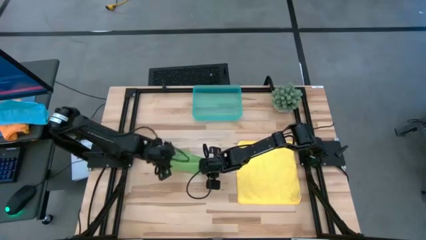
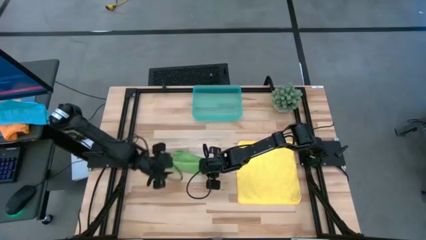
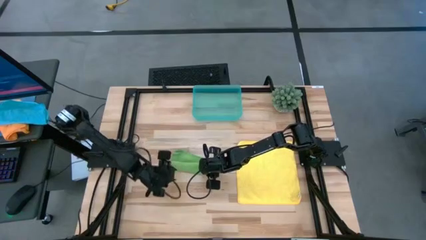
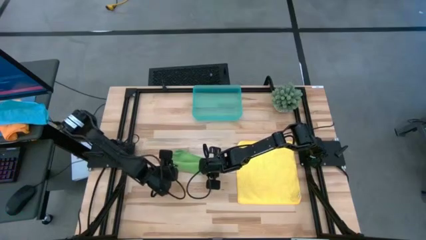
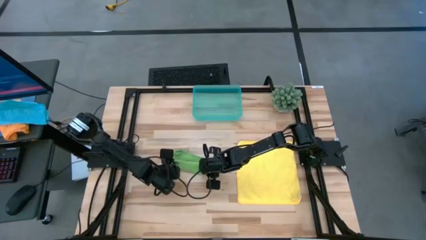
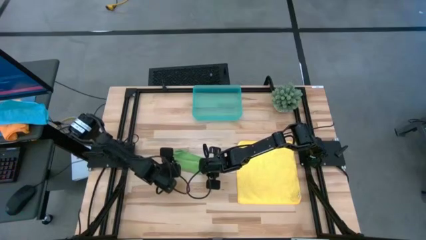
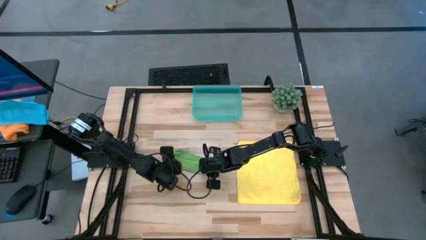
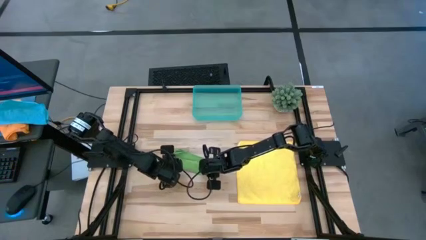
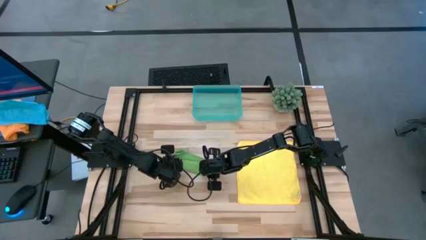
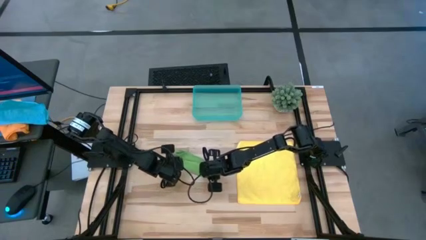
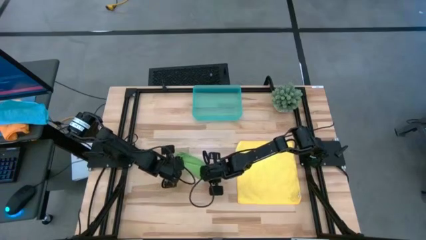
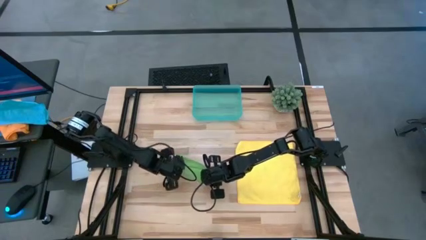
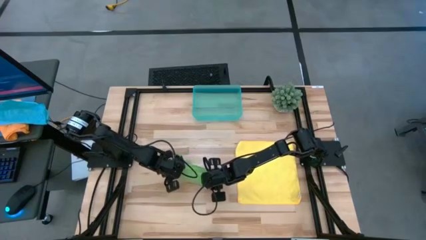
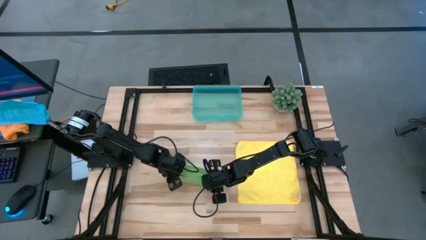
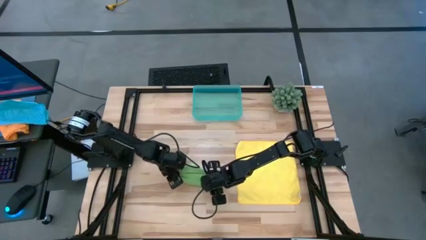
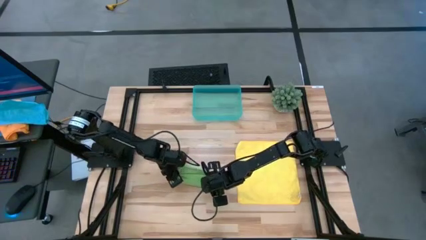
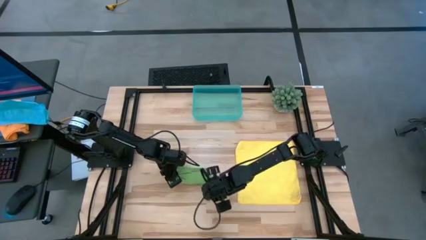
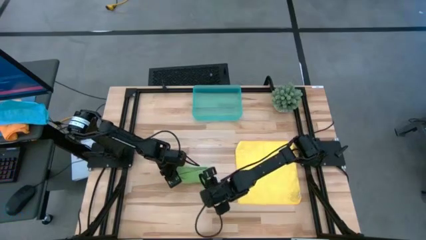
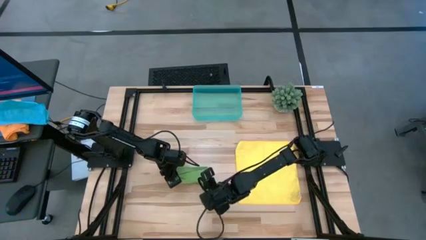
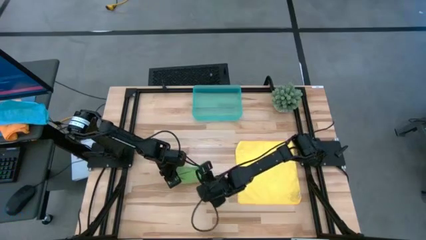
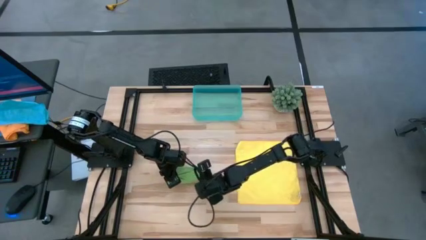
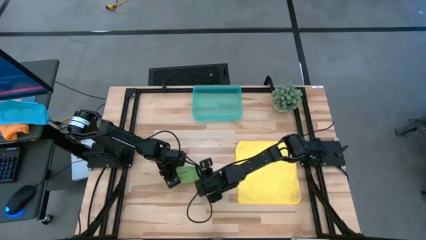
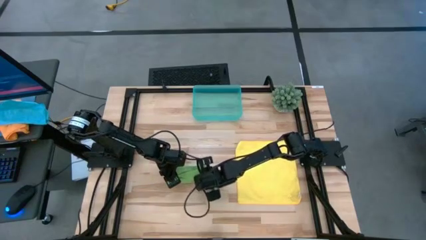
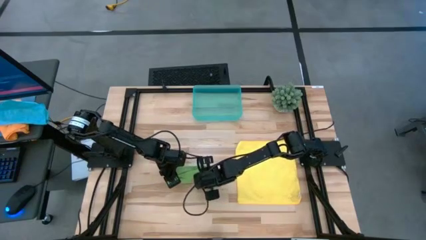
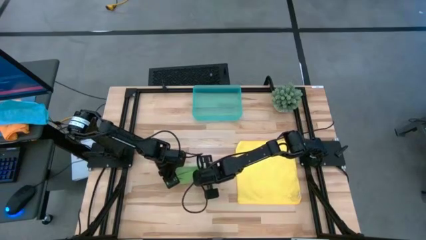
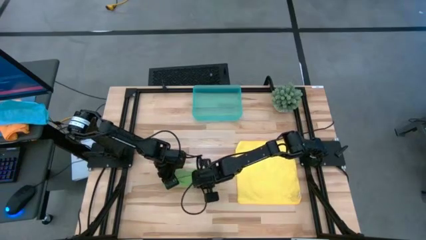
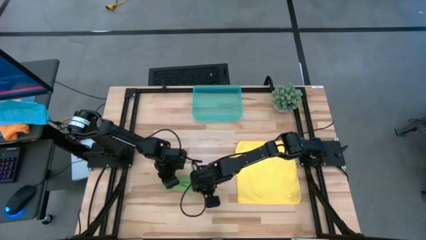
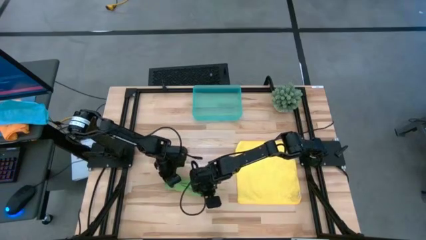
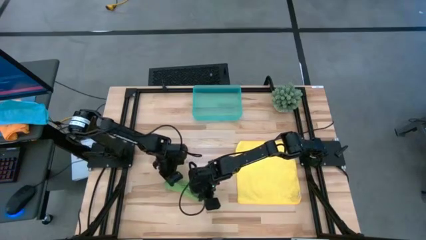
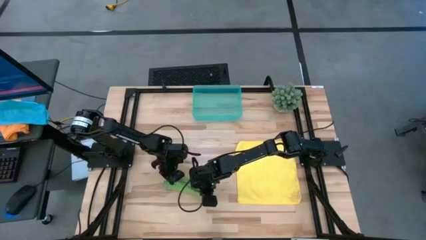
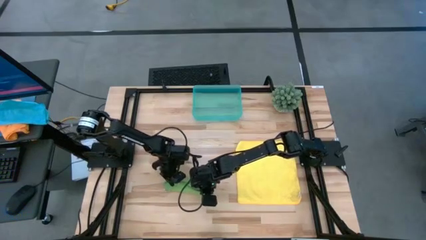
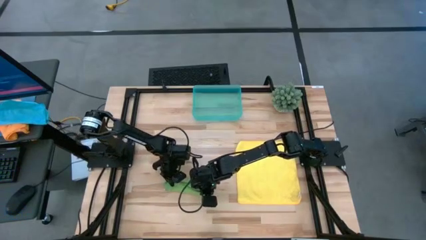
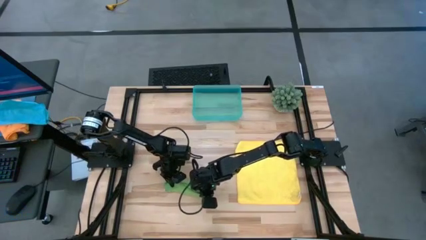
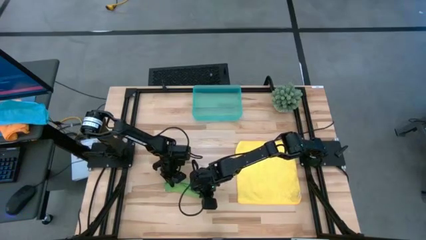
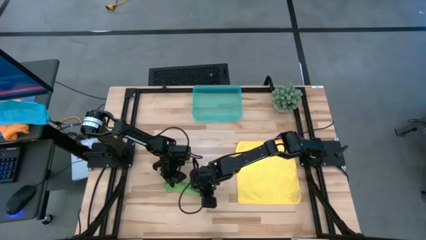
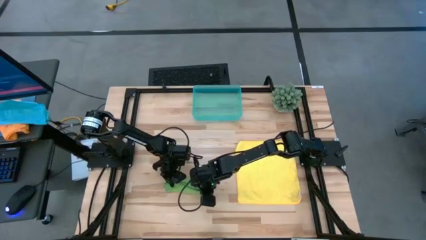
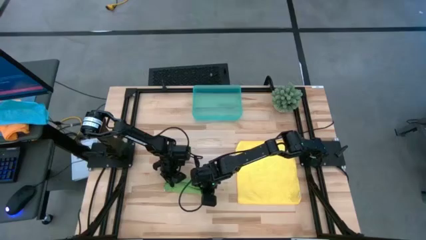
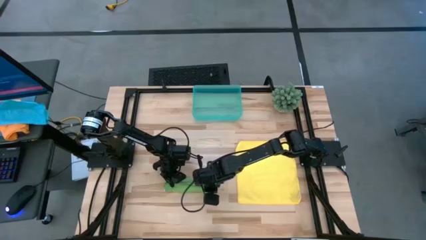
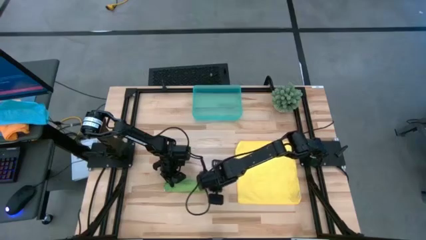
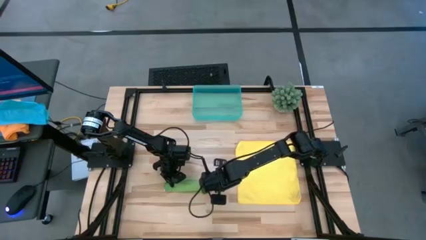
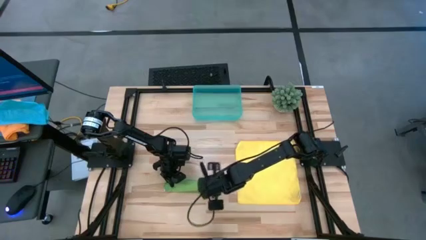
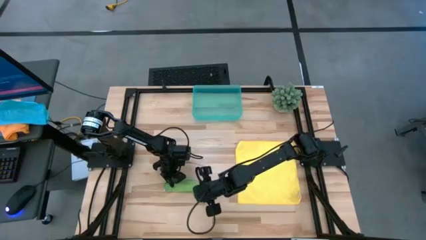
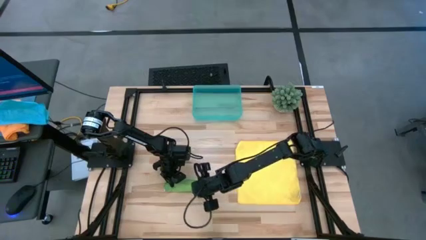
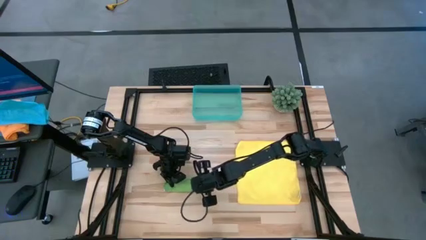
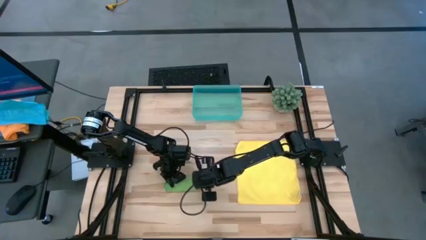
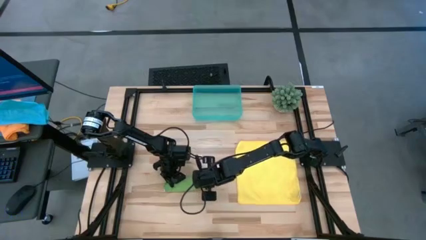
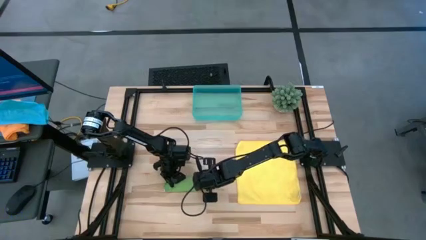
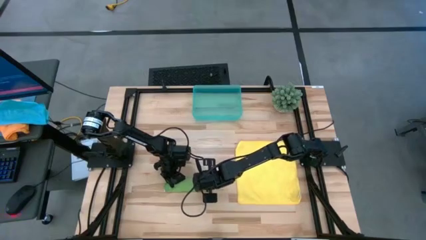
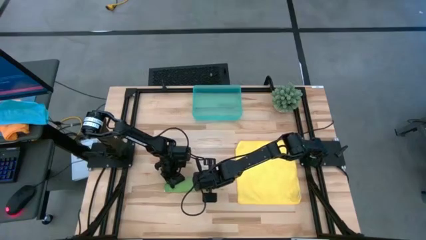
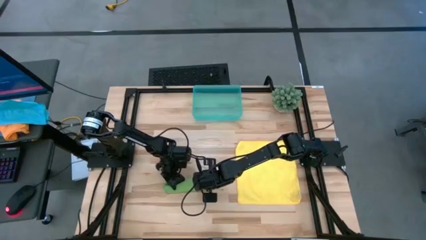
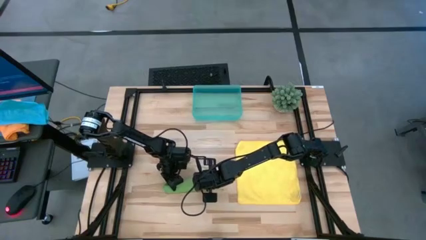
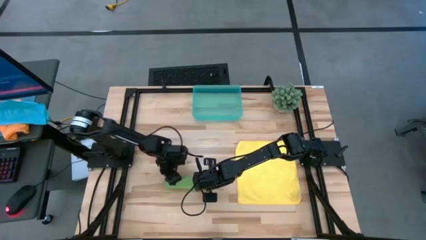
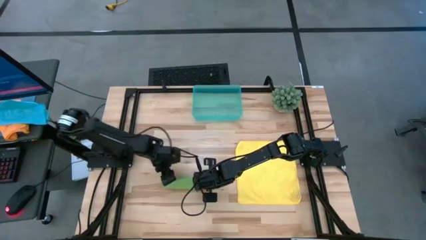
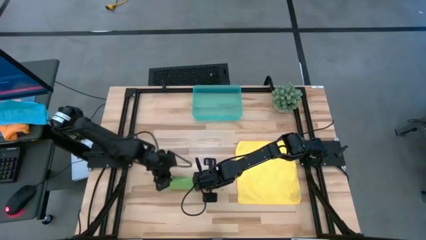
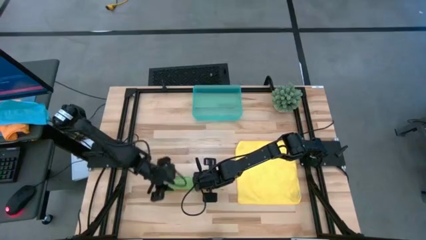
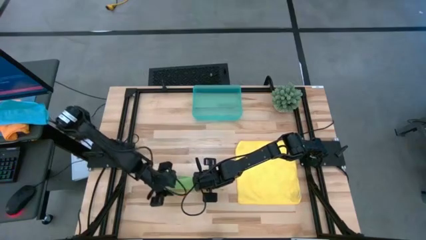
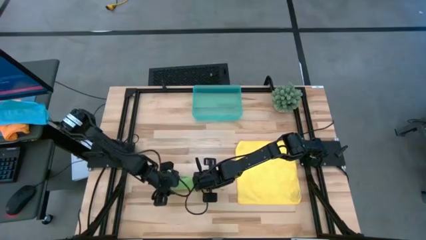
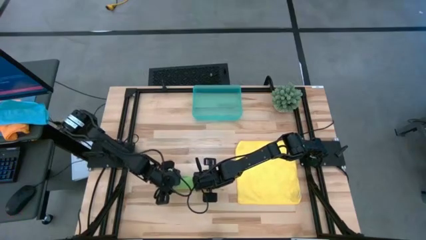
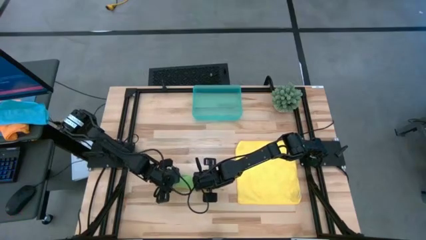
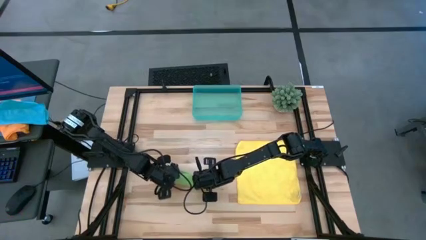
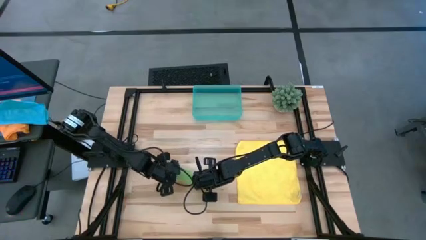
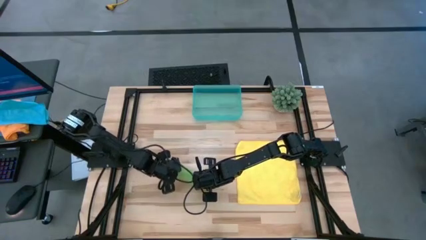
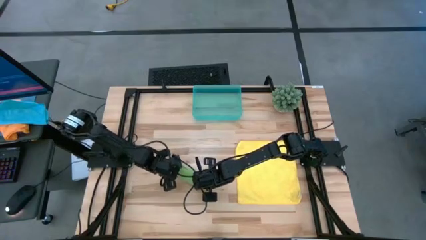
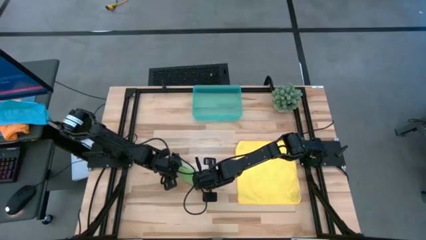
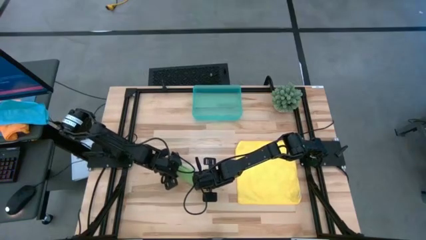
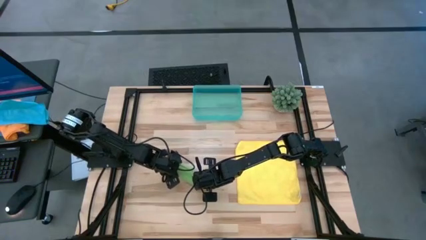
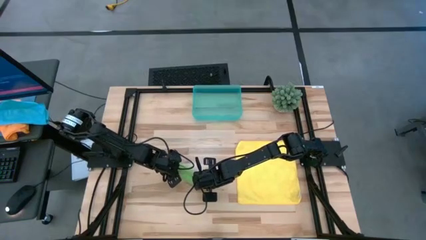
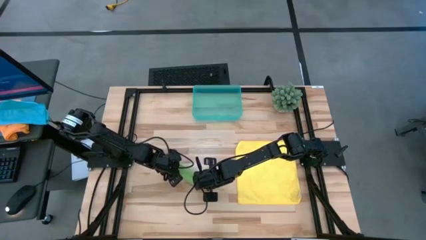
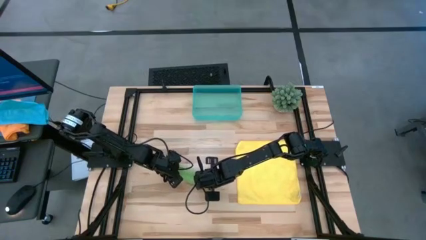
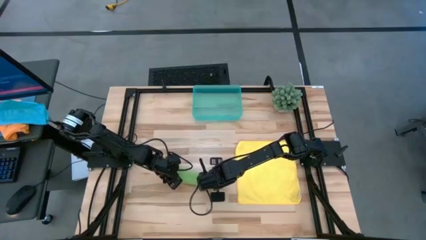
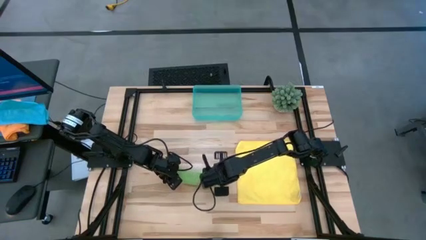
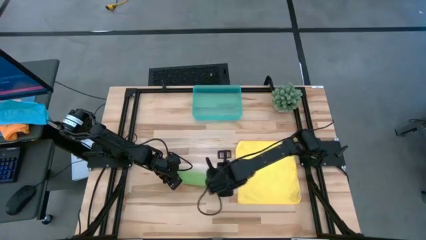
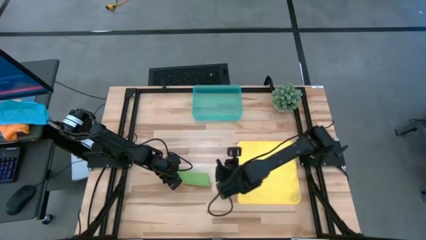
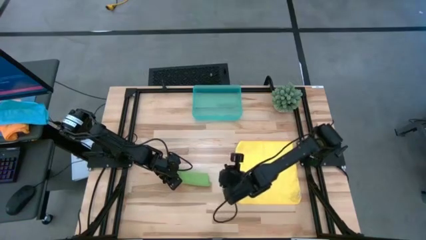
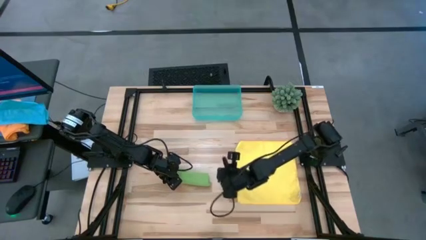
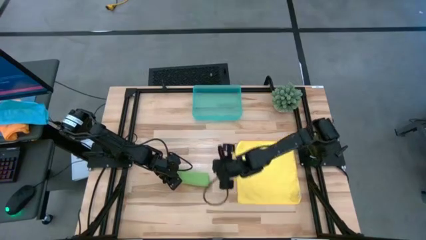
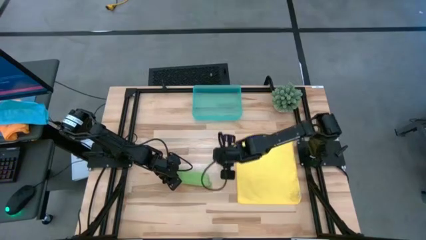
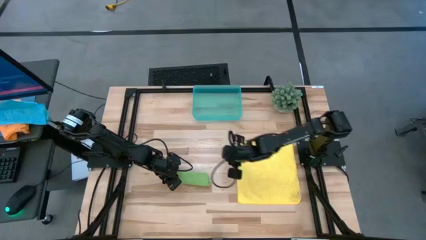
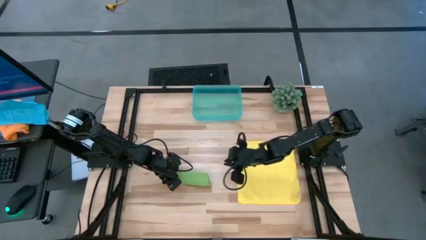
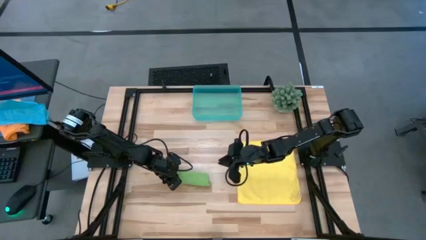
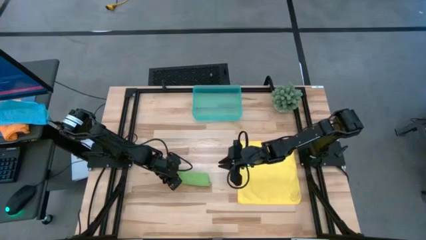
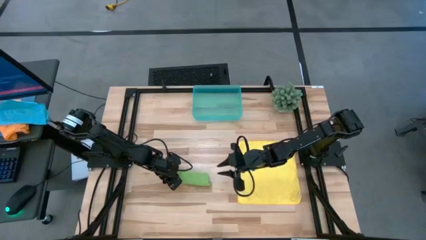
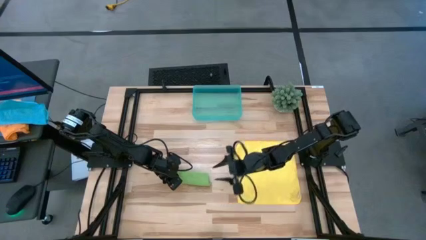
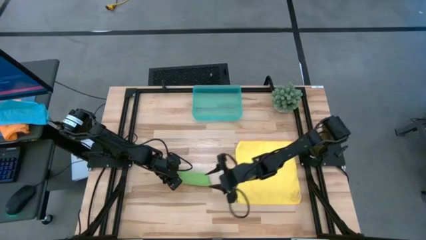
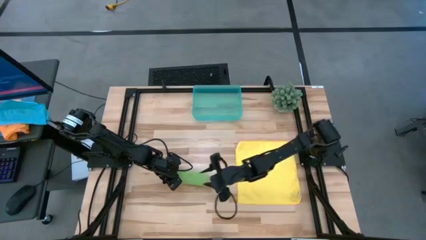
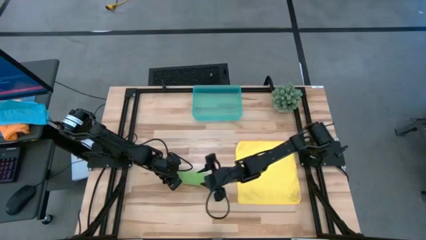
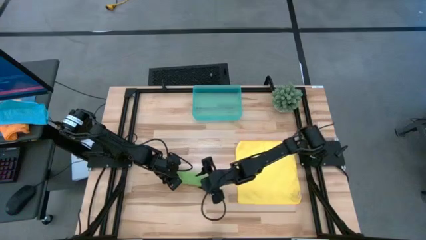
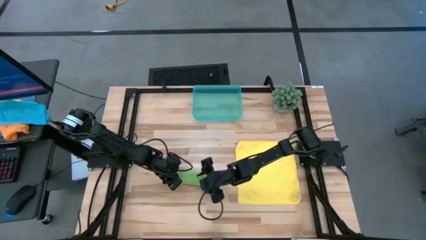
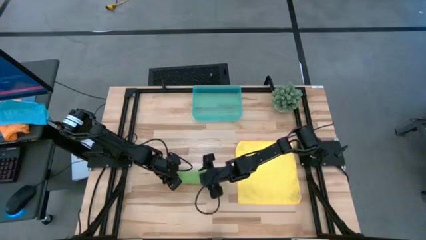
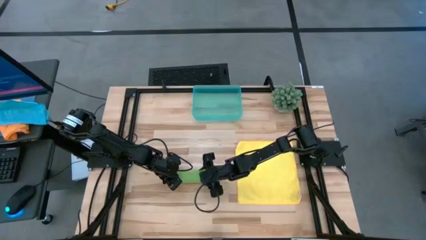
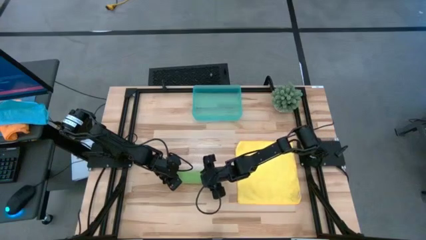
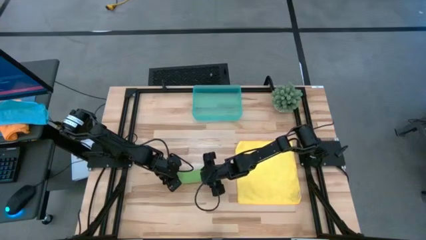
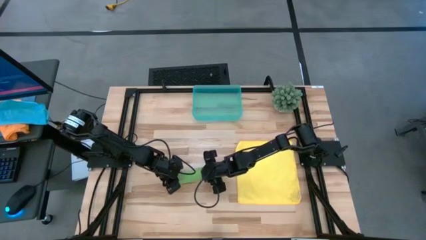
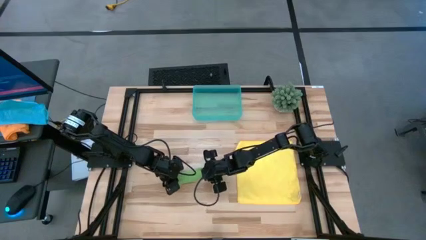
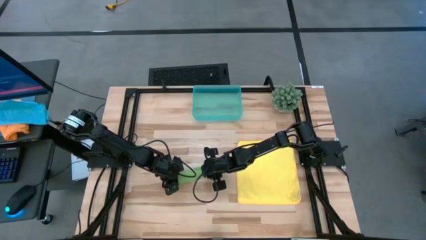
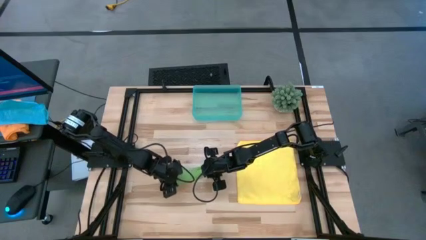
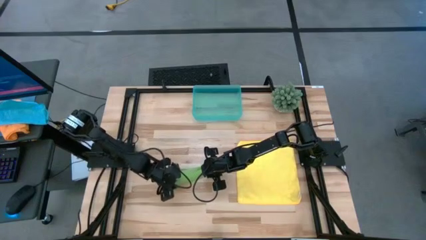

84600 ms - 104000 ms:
Task: Roll microfiber towels into tight, uniform cylinder then place into a basket
Roll the green towel
